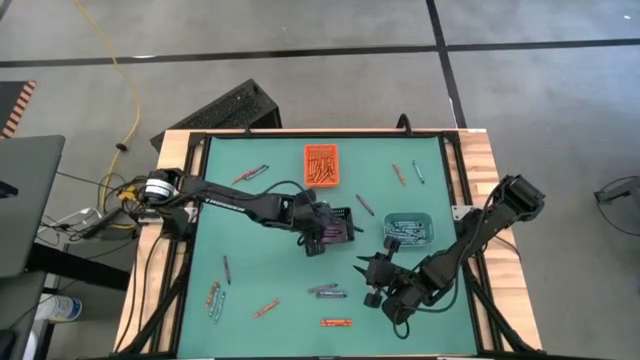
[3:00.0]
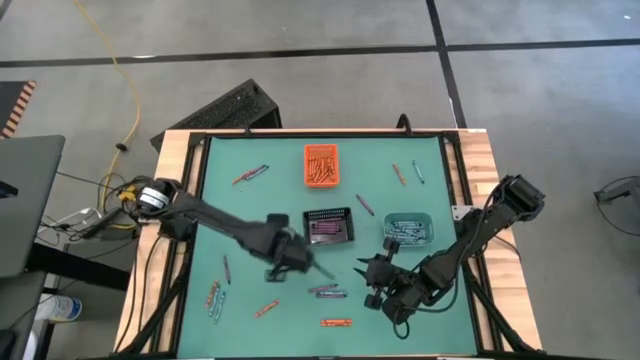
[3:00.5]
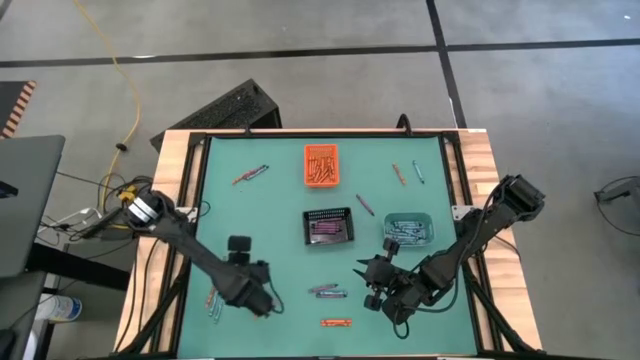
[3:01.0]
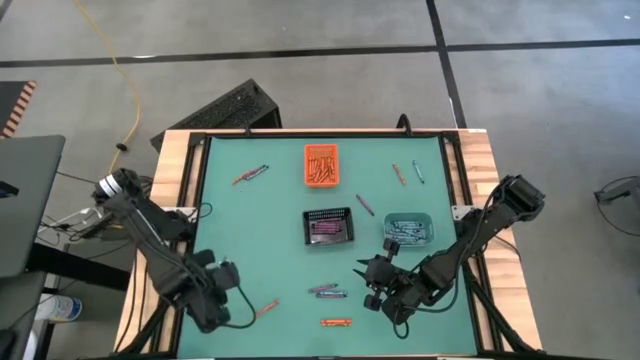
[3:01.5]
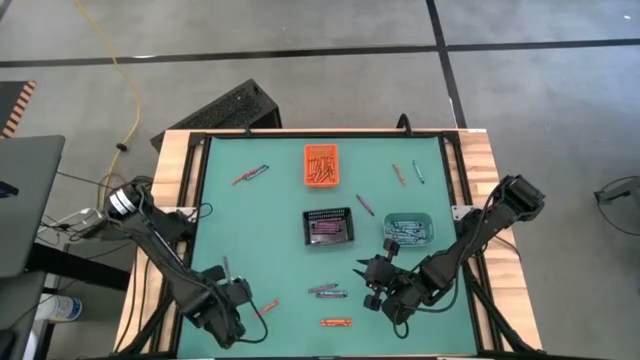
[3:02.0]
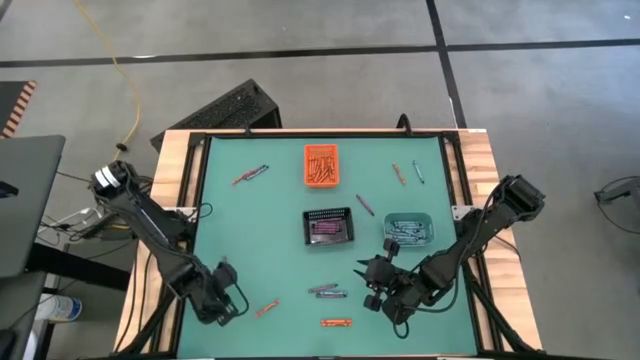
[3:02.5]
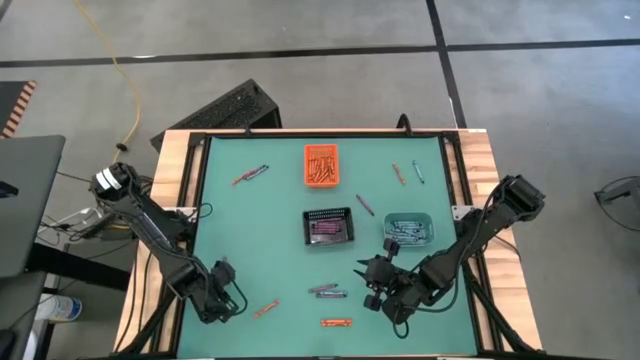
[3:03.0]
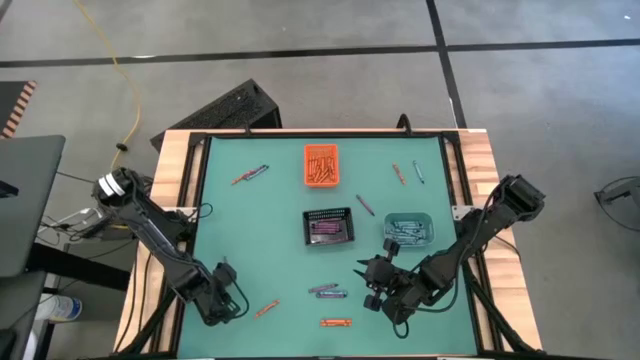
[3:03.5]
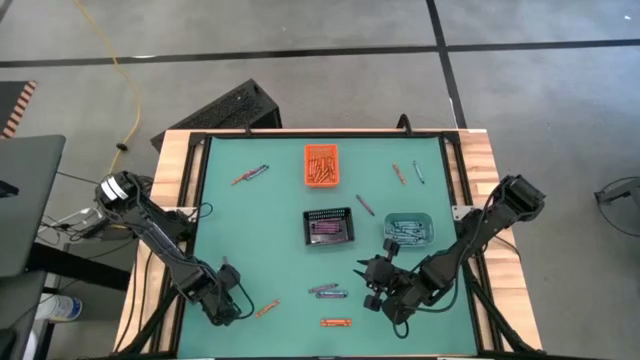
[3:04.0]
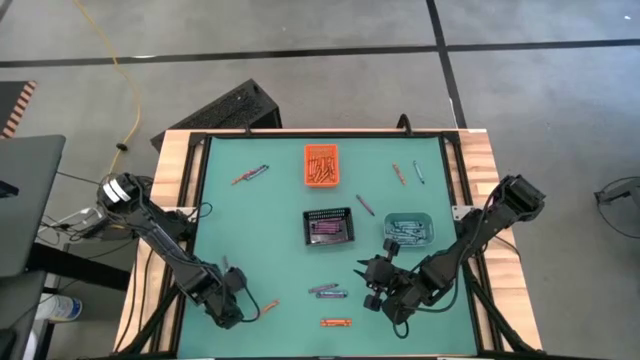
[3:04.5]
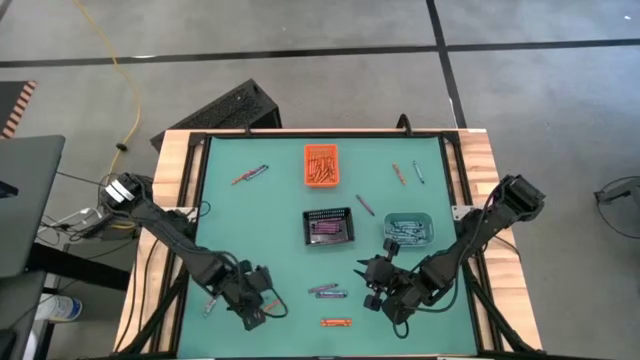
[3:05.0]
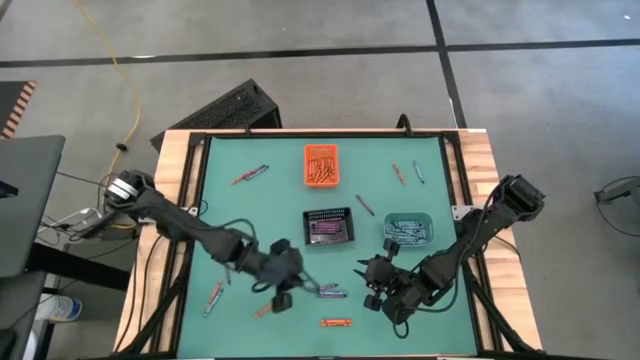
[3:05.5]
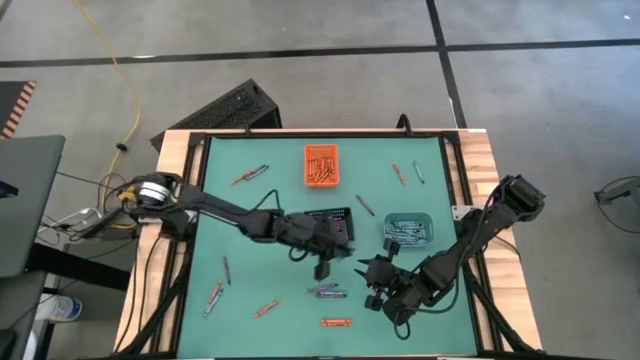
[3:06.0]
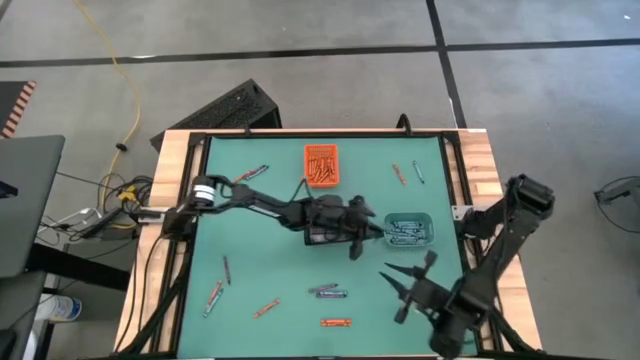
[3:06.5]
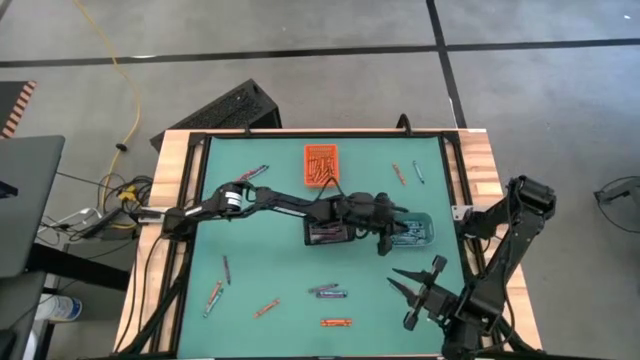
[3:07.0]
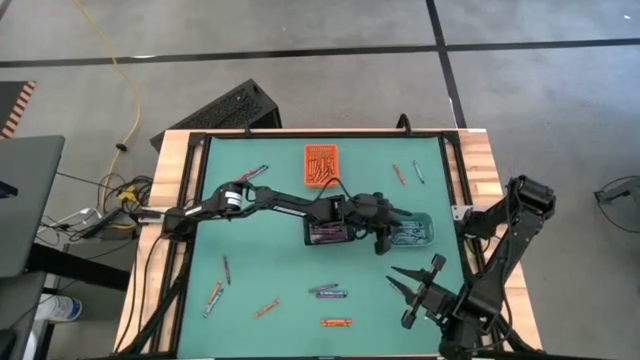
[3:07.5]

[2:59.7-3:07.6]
Task: Sort crayons
Put the blue crayon into the green bin

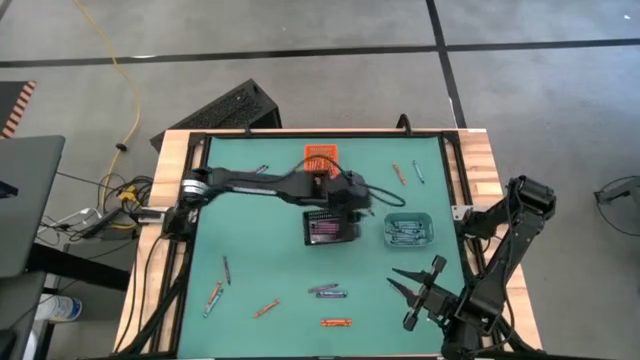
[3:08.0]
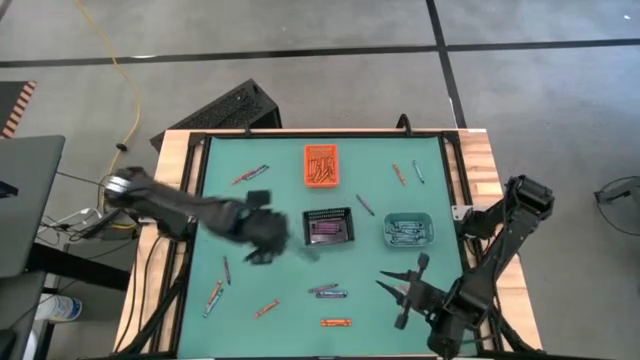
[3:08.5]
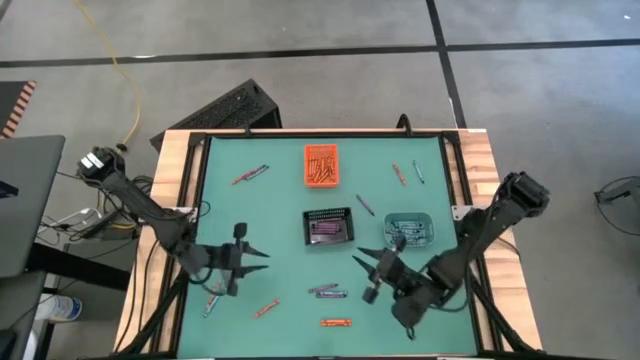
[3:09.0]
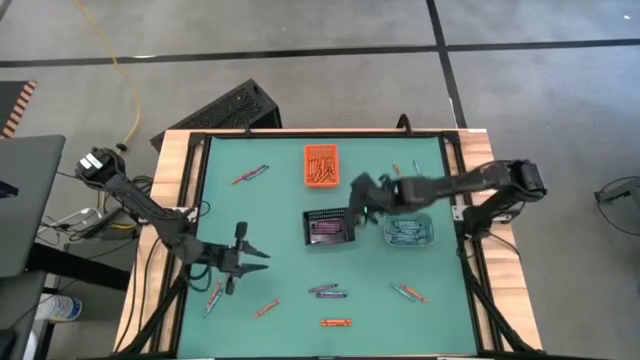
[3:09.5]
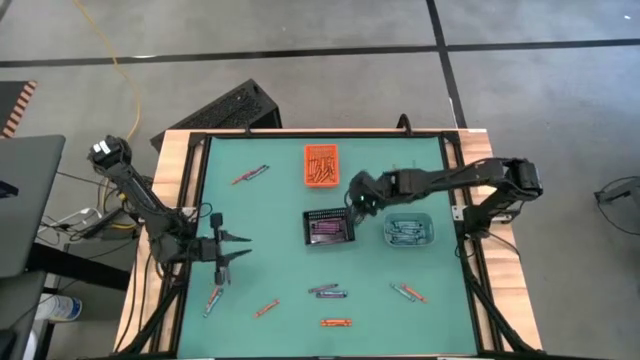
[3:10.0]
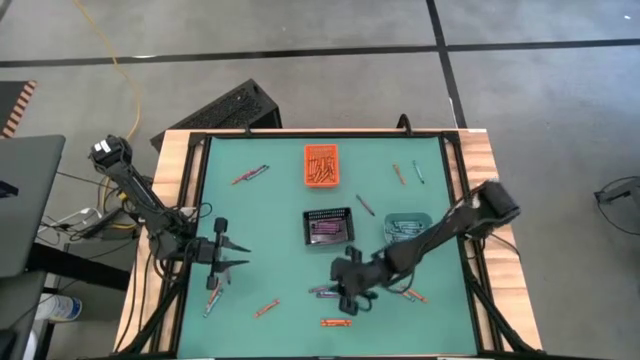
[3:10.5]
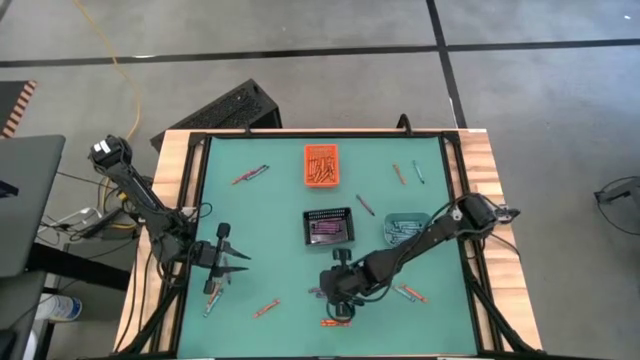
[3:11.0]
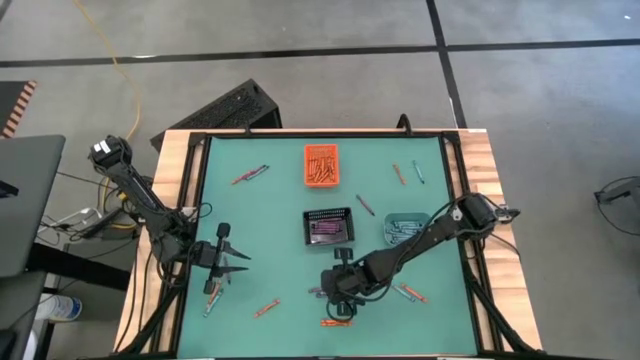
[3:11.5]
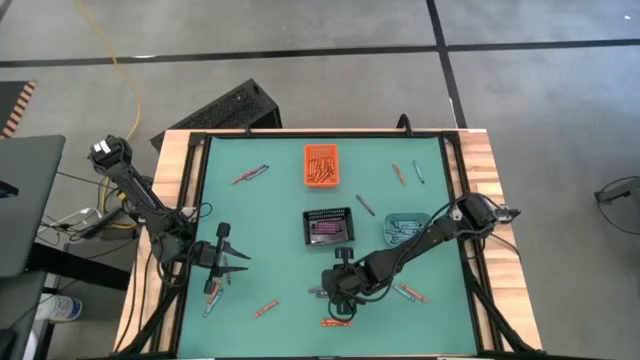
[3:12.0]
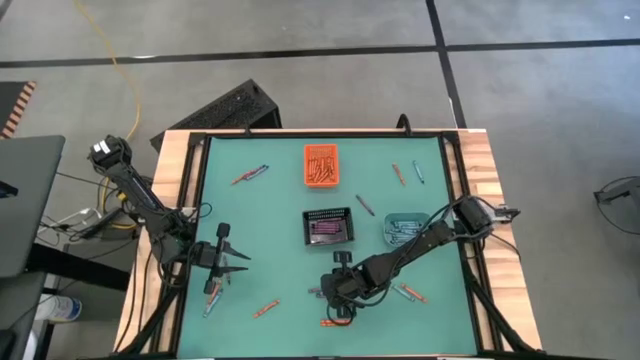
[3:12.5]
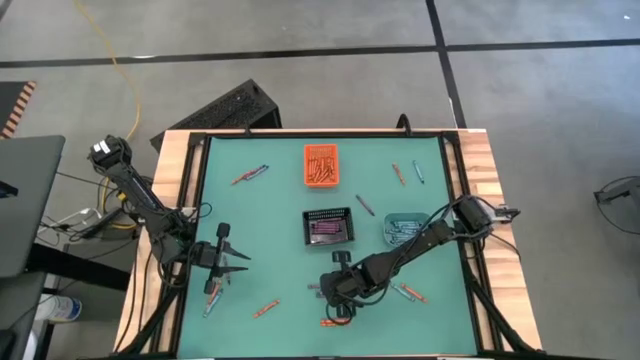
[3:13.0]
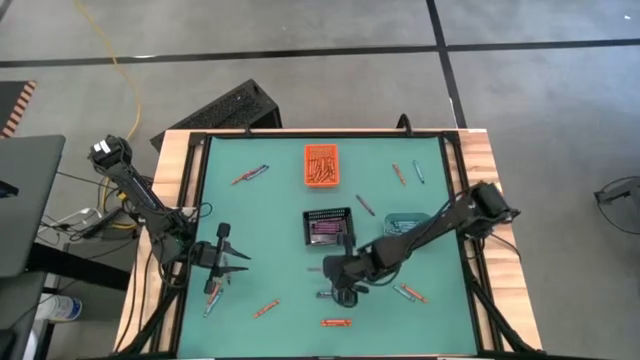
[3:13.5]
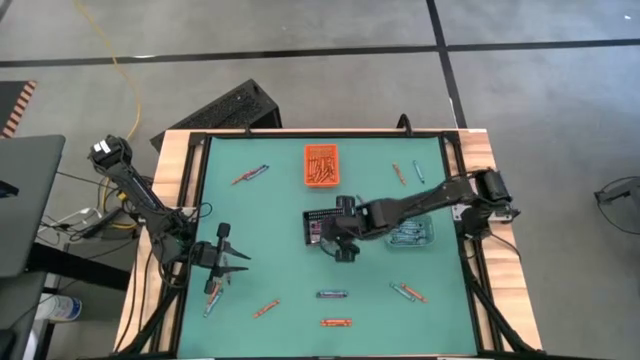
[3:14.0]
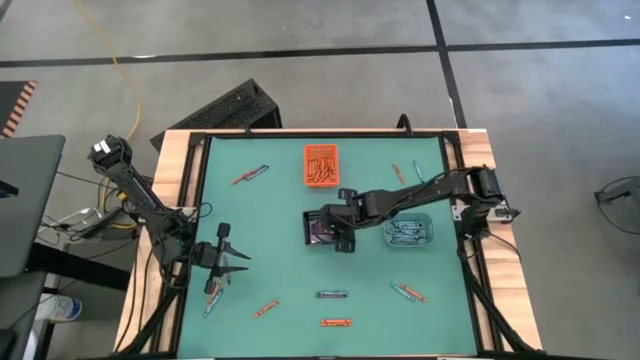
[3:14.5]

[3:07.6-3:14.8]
Put the violet crayon into the black bin

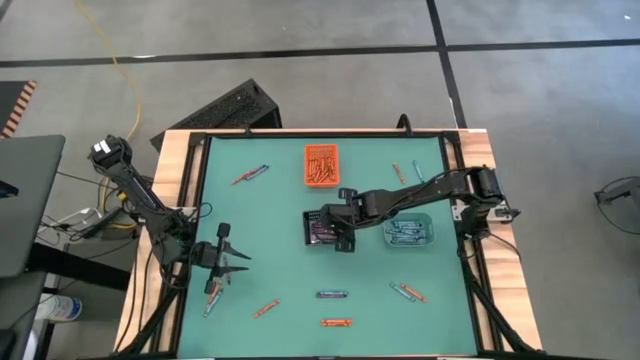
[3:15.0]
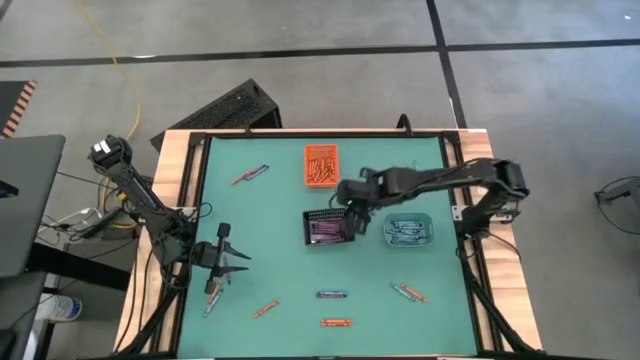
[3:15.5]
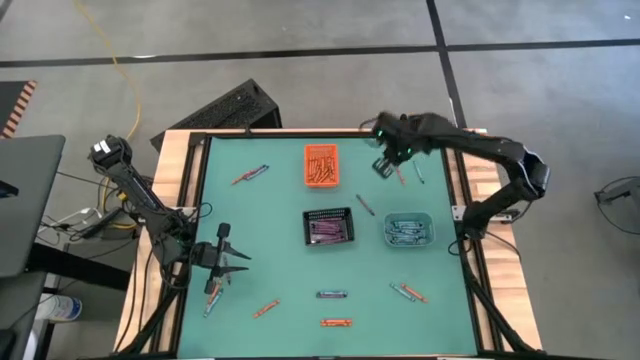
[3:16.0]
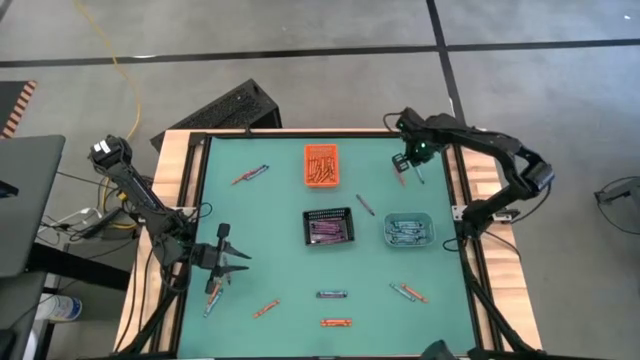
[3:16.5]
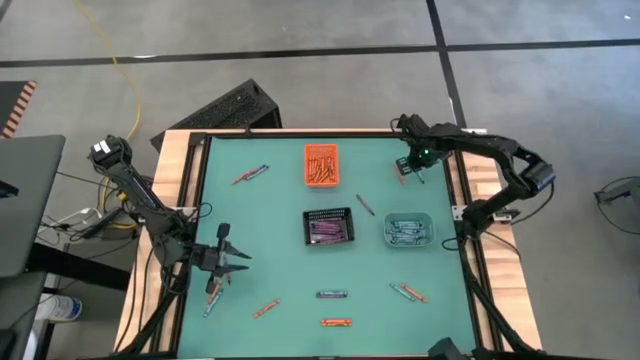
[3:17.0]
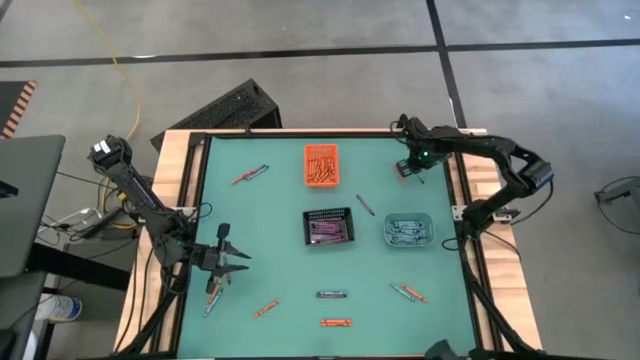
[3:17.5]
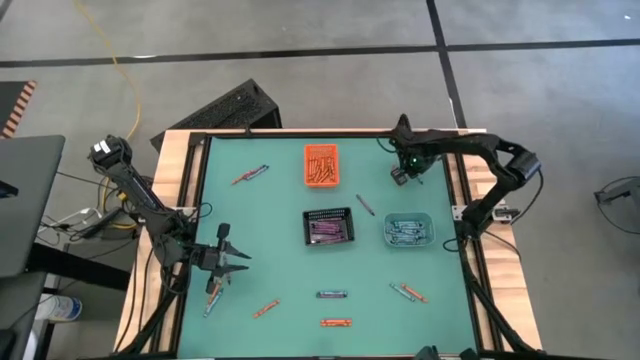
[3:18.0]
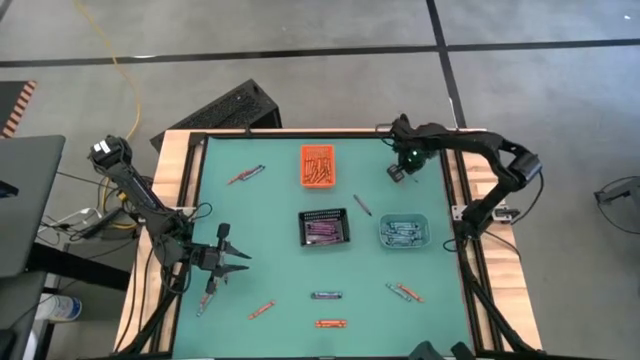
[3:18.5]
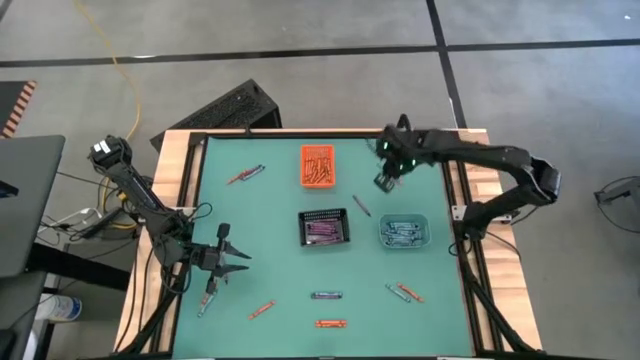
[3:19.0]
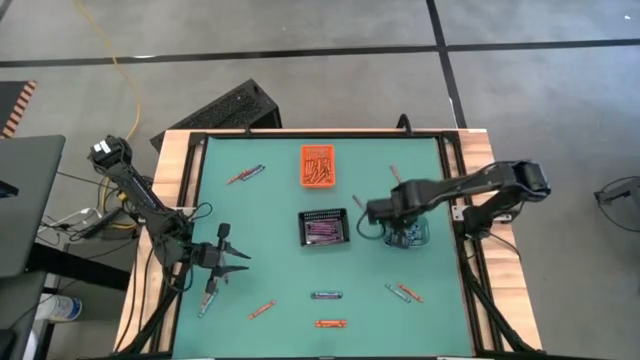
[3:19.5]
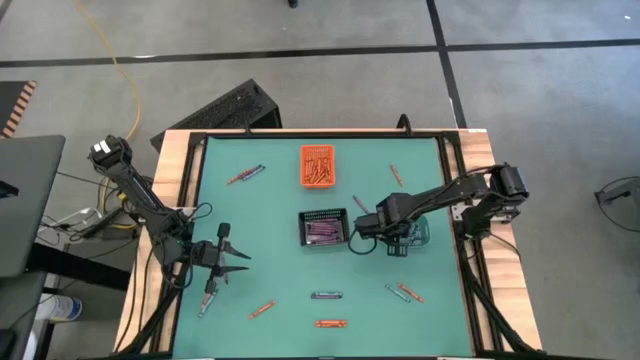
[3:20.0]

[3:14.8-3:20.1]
Put the blue crayon into the green bin

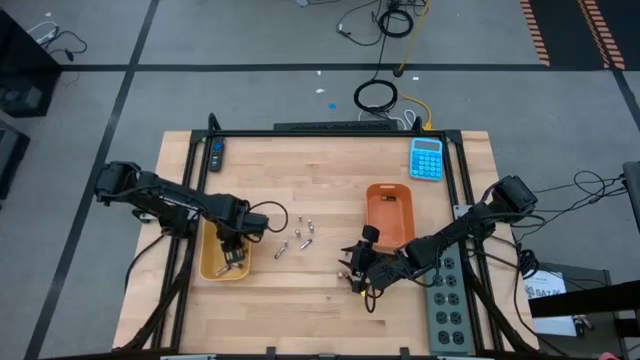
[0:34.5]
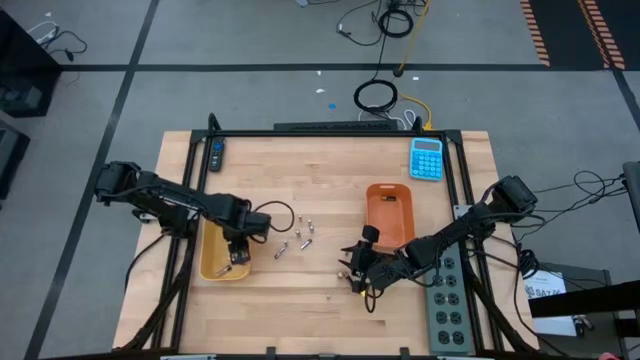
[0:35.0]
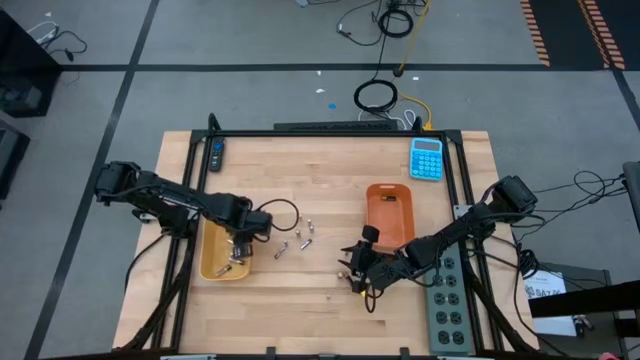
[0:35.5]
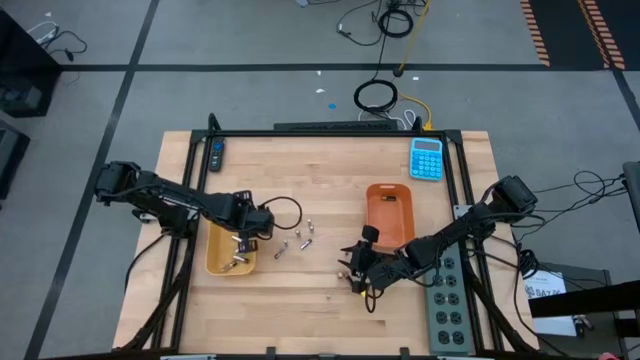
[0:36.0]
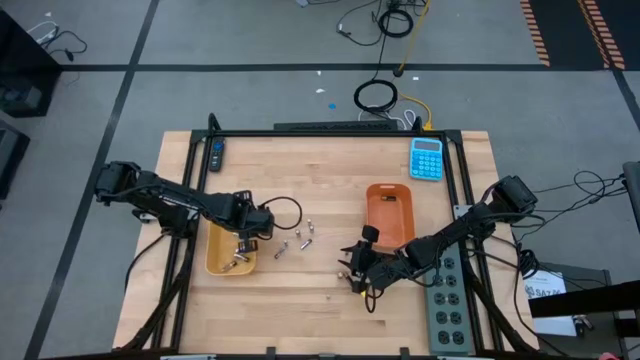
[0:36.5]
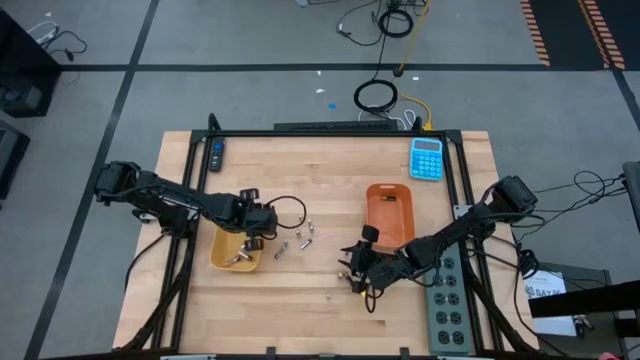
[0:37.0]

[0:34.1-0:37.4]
Task: Sort batteries
Adjust the yellow bin
